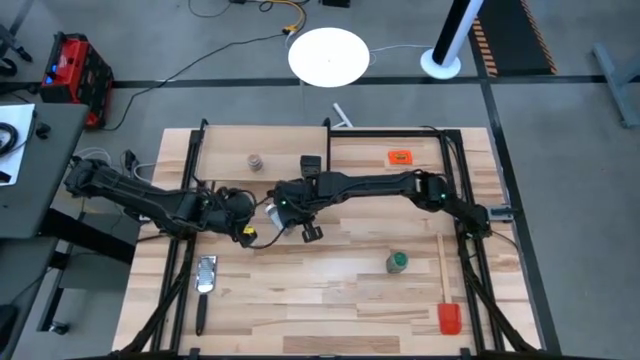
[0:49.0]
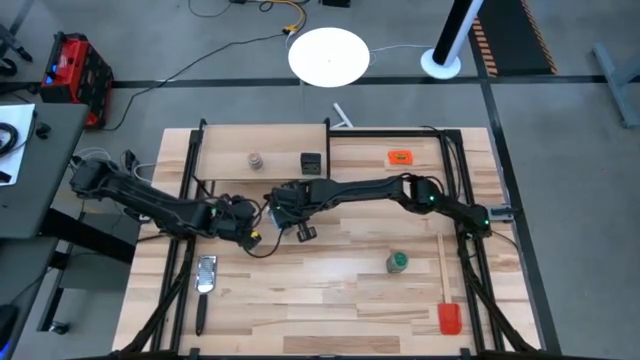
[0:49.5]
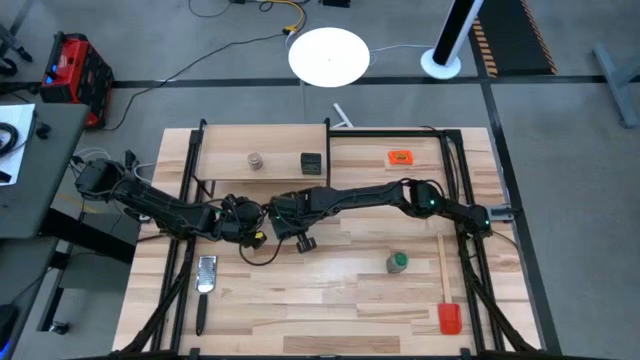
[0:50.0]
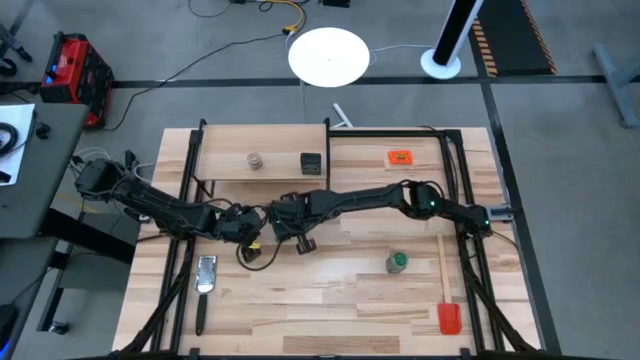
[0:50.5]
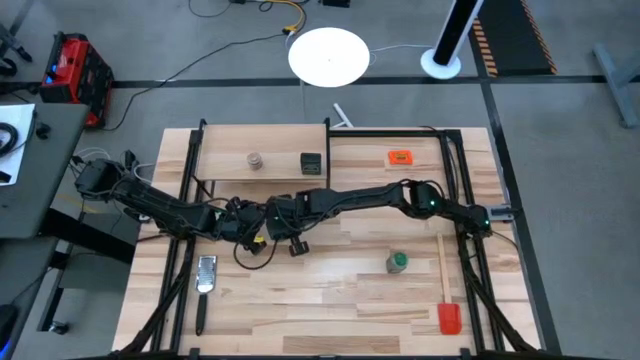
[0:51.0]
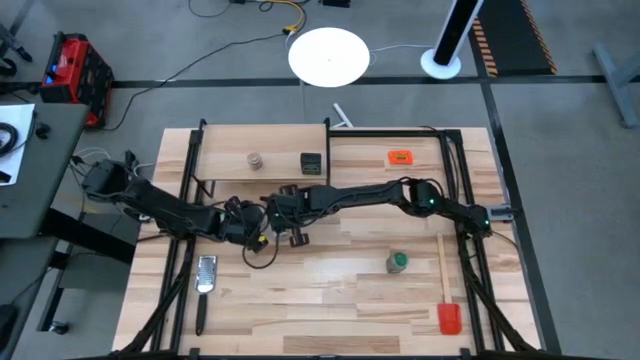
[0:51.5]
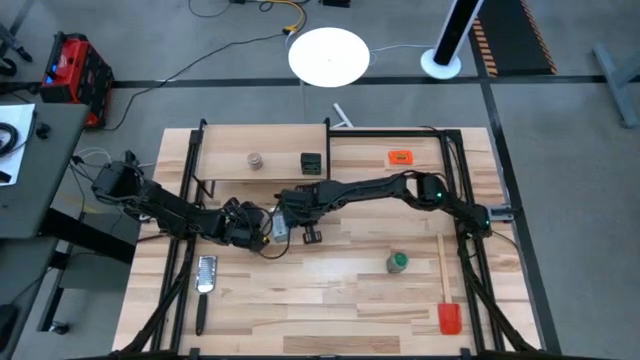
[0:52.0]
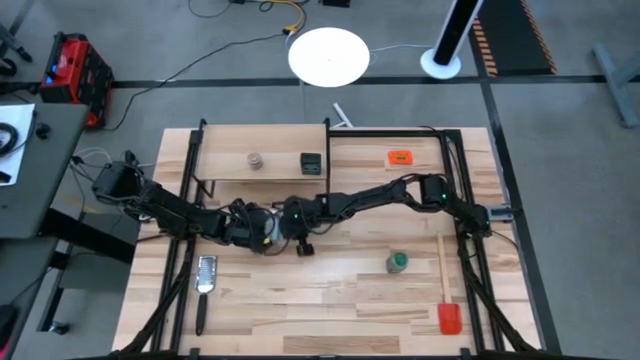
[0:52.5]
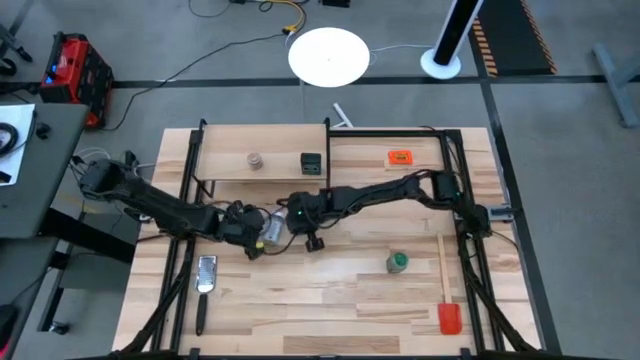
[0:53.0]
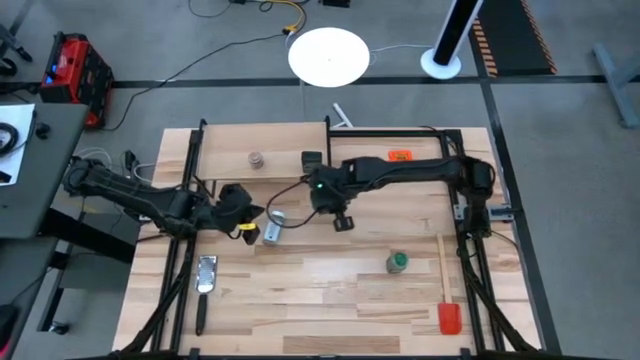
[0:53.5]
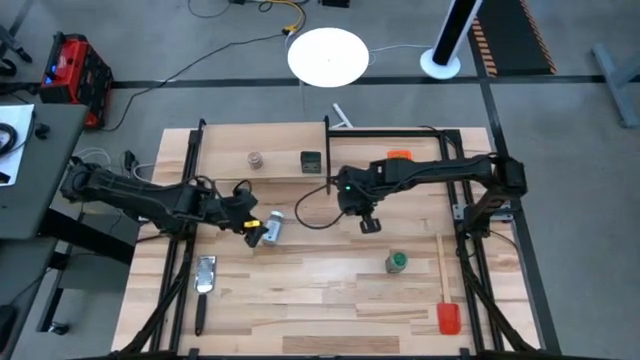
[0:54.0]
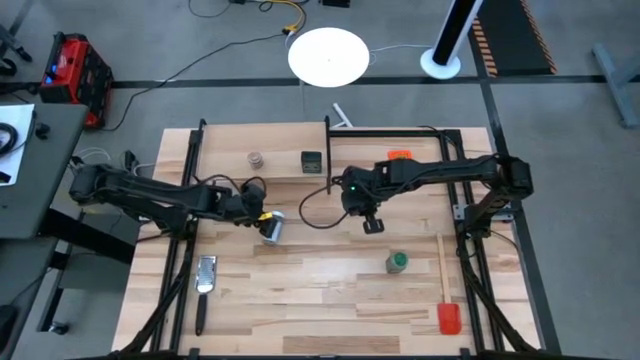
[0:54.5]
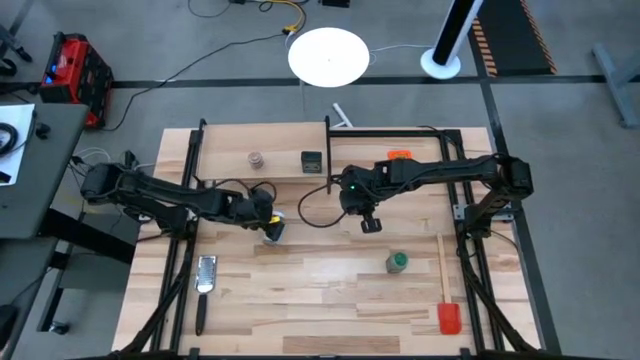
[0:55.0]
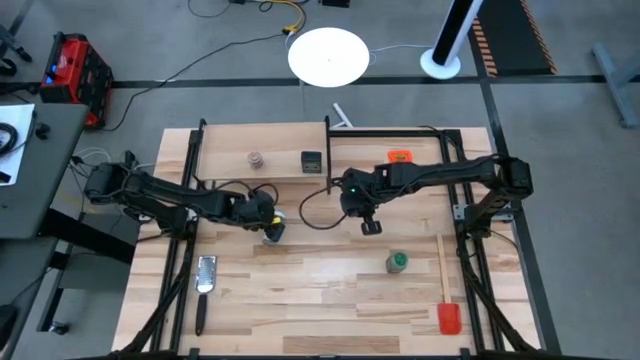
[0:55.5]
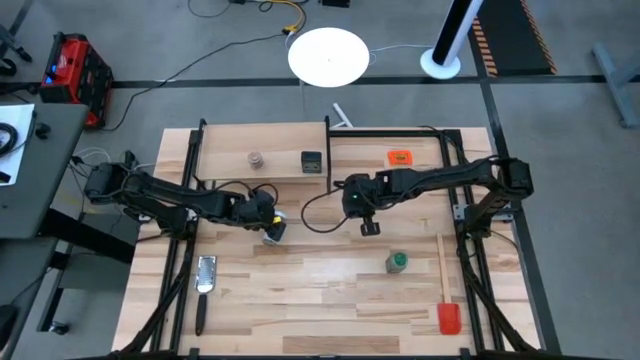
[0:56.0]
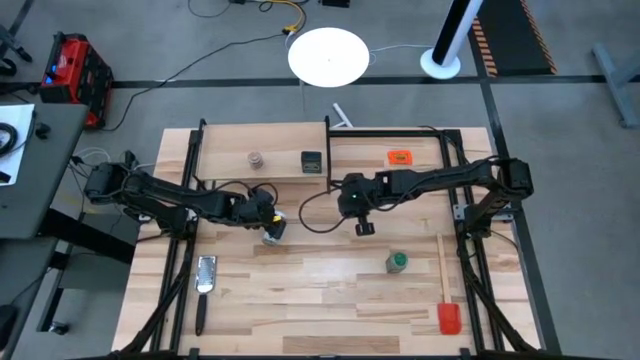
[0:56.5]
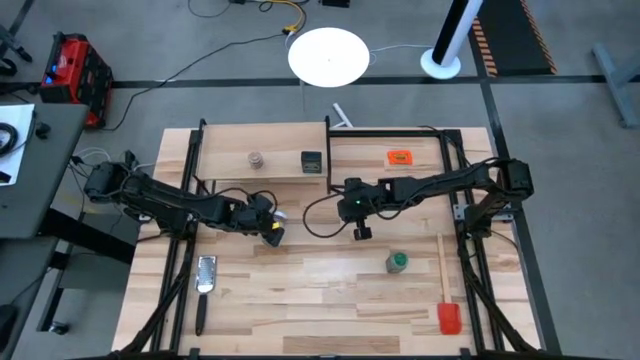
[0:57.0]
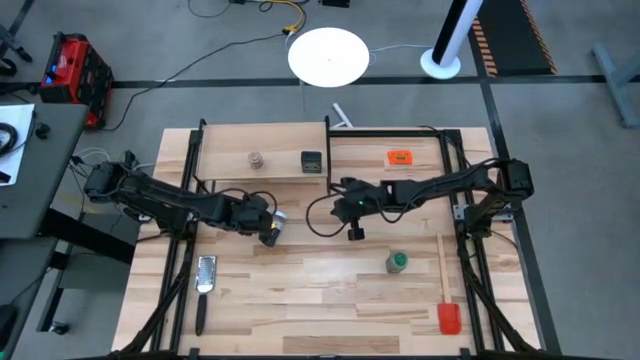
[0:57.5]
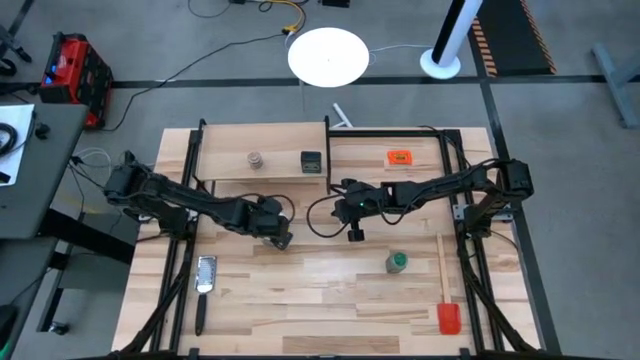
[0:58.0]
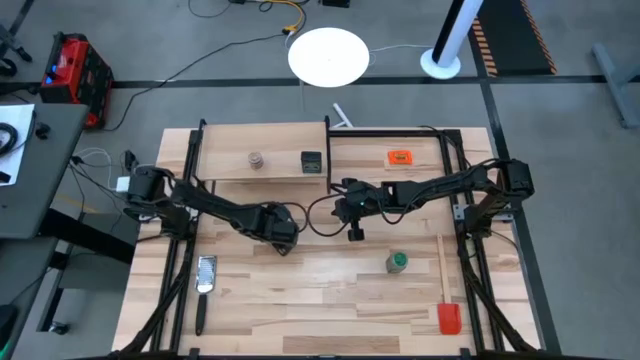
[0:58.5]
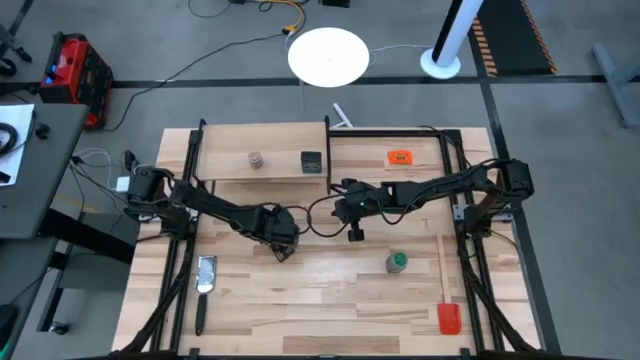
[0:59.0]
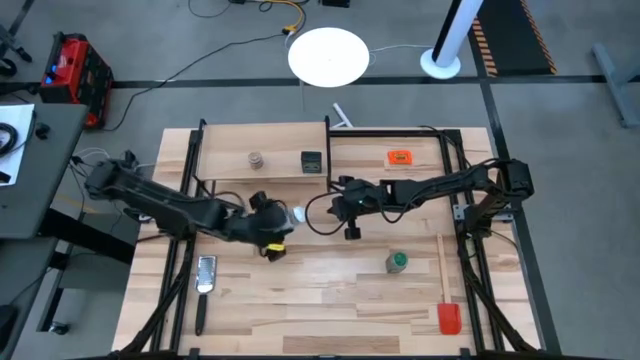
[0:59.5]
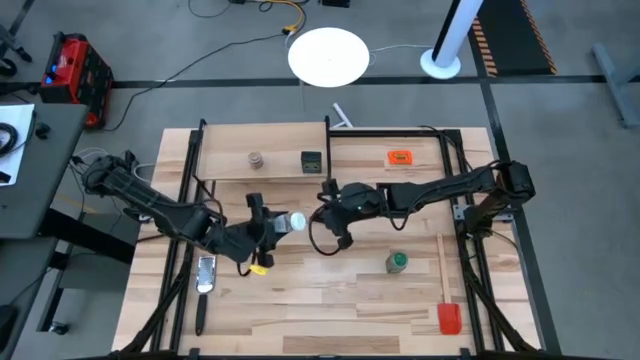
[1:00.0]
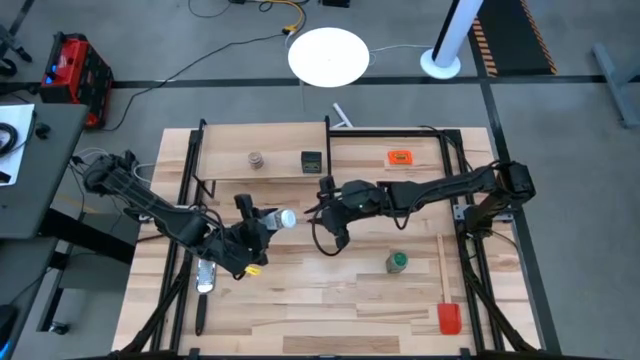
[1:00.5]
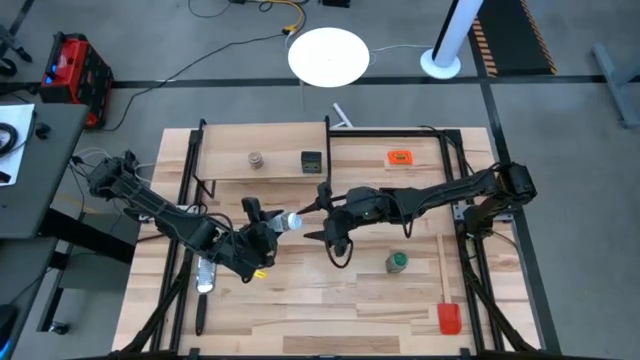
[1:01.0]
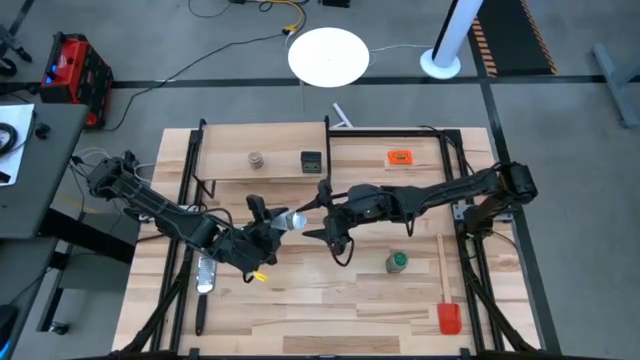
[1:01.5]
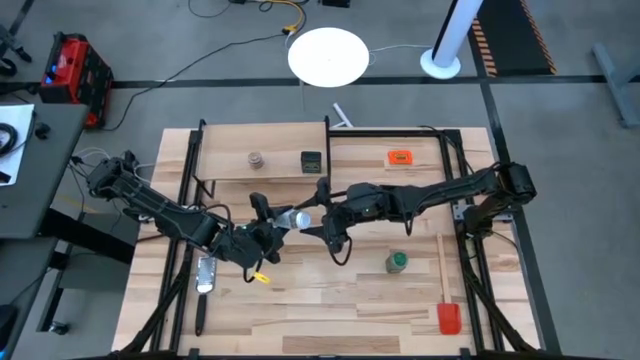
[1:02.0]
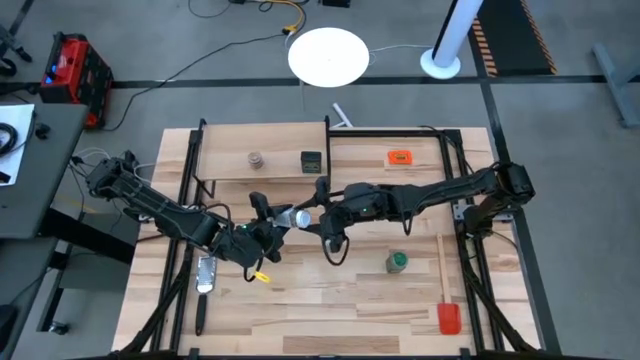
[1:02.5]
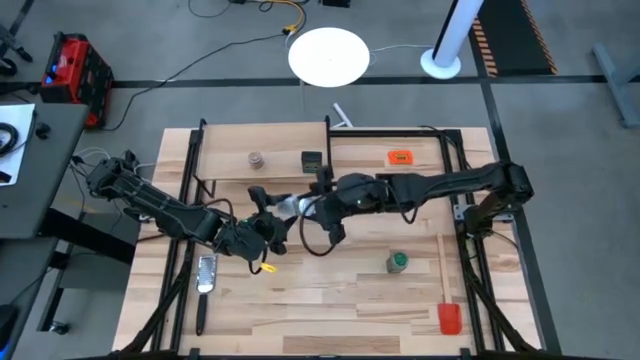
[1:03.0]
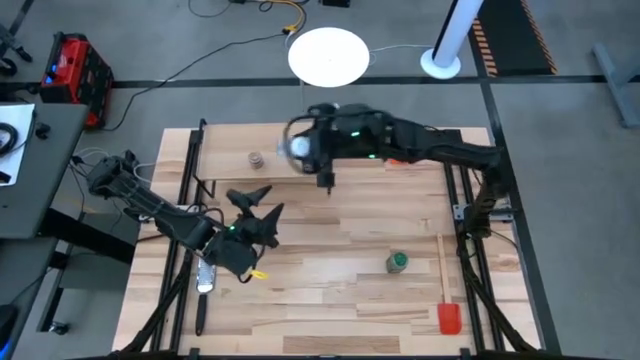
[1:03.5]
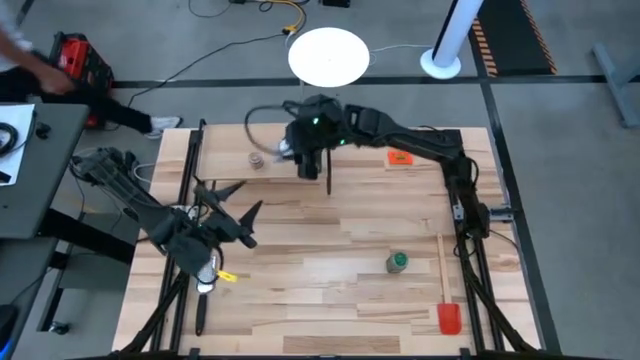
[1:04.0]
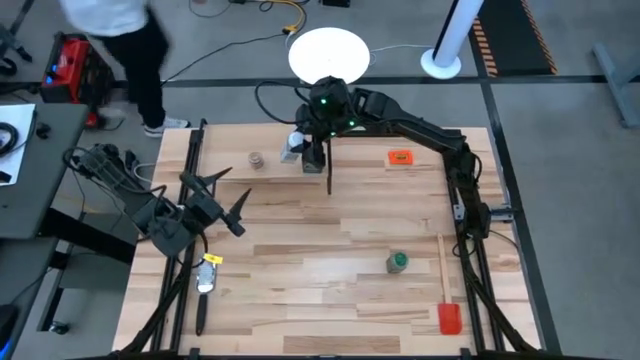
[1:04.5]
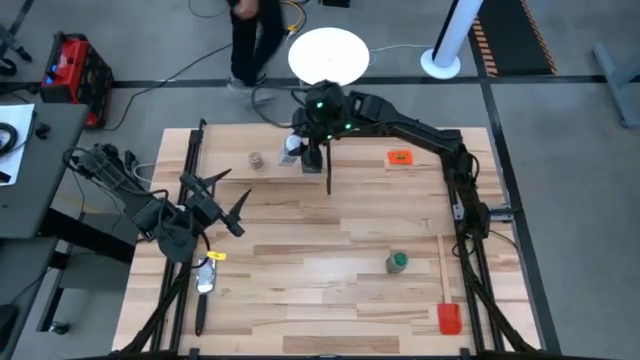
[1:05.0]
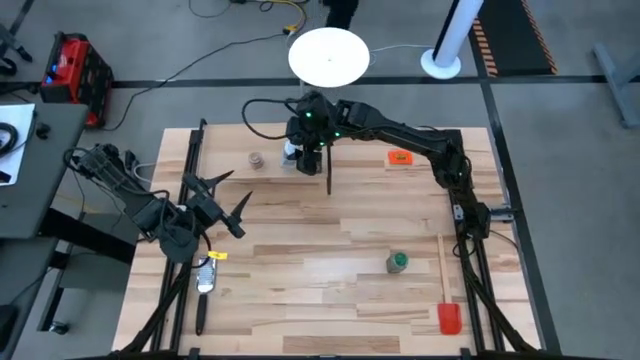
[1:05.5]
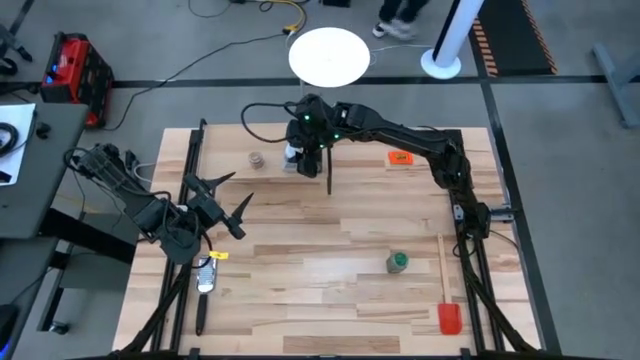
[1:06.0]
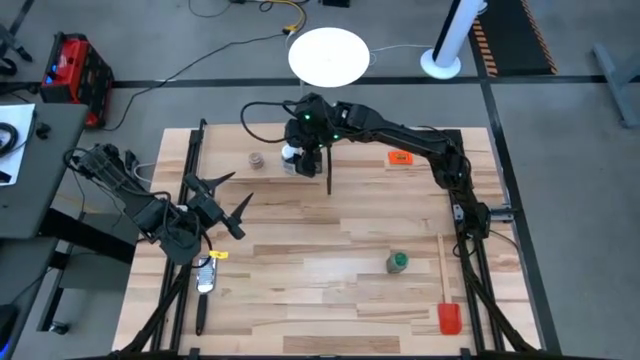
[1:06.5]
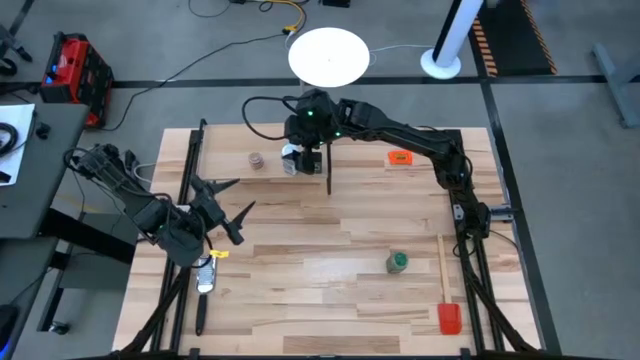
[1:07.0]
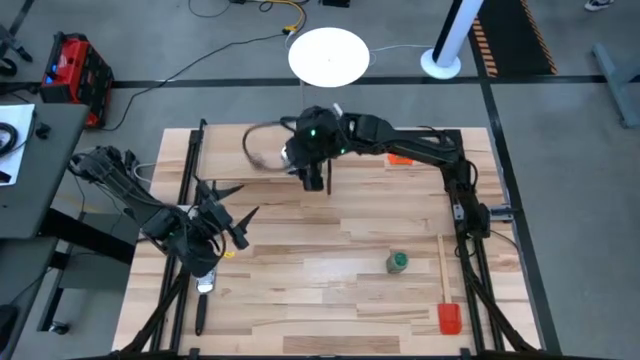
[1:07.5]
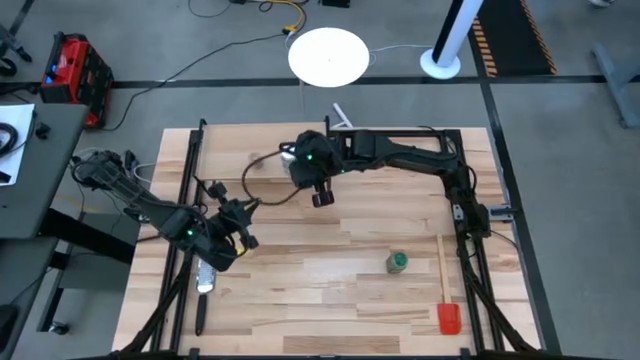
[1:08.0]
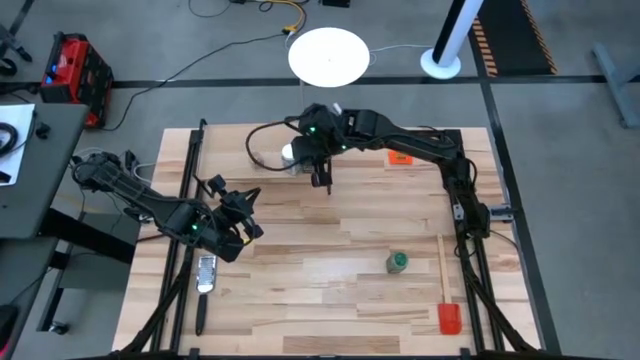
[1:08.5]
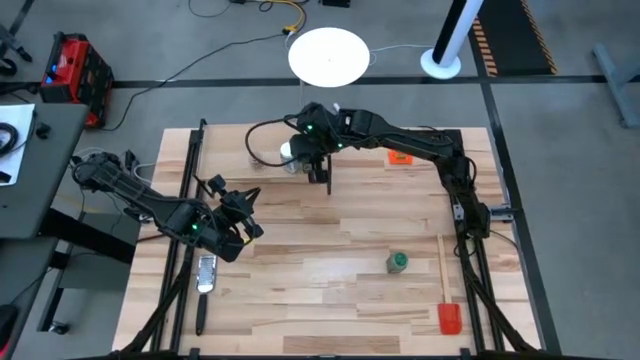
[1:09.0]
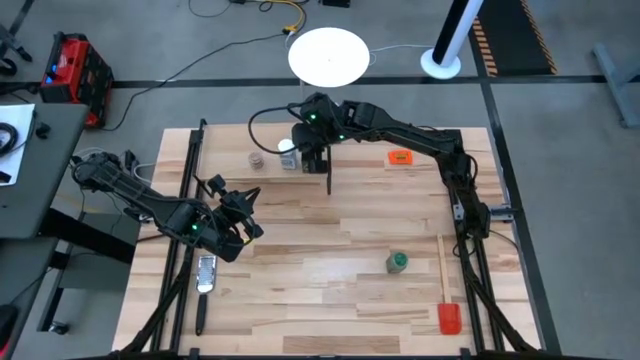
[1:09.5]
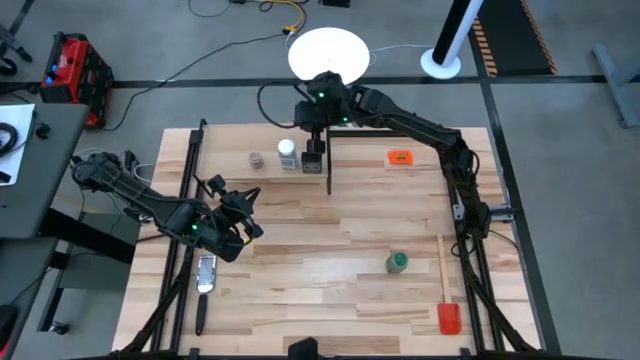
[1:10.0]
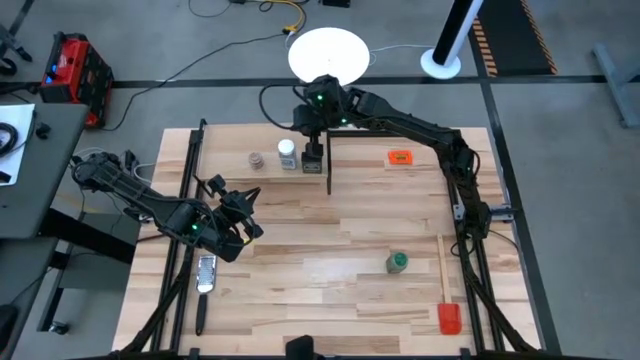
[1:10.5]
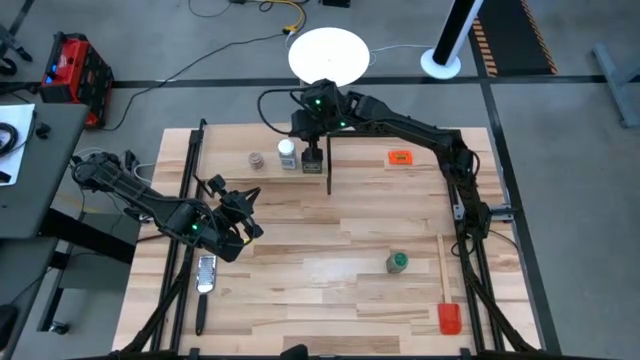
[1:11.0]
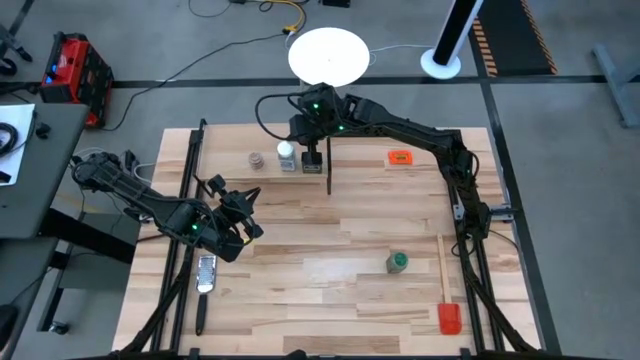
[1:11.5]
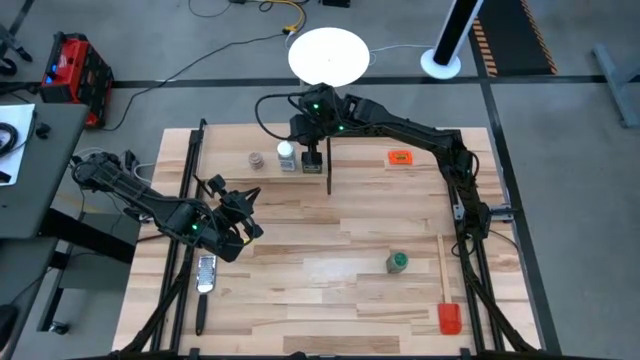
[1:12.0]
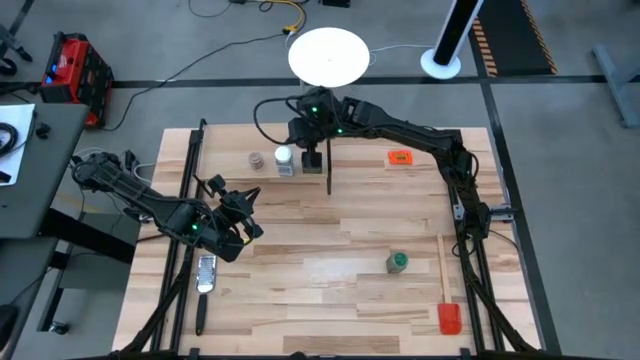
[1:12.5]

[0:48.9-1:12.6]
Task: Shelf spices
Put the white seasoning bottle on the shelf
